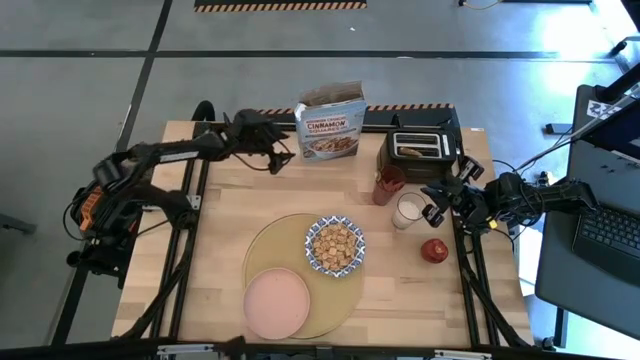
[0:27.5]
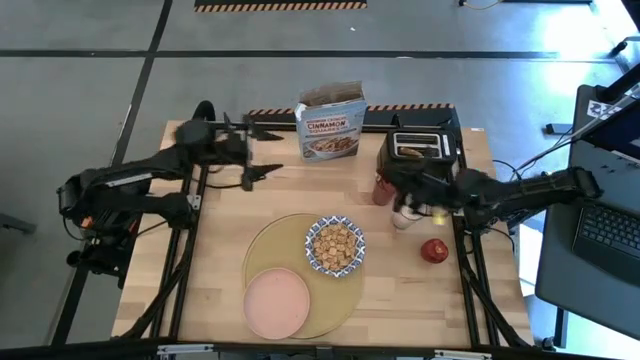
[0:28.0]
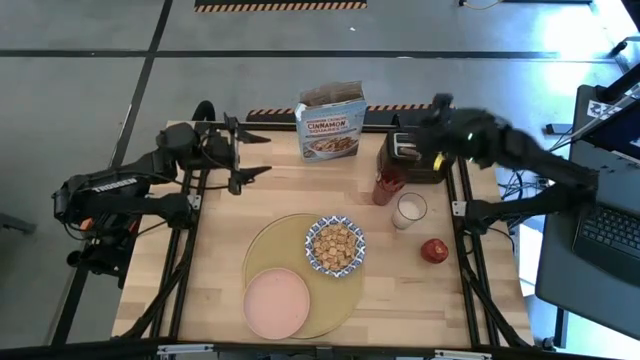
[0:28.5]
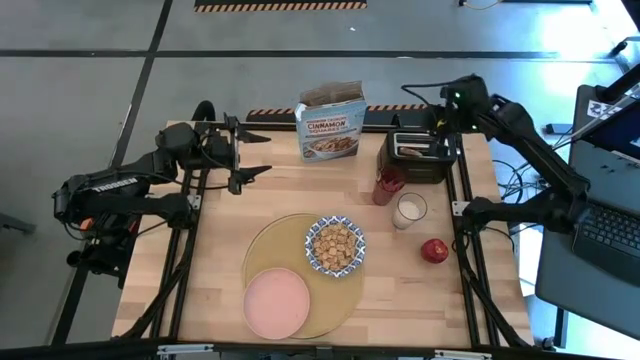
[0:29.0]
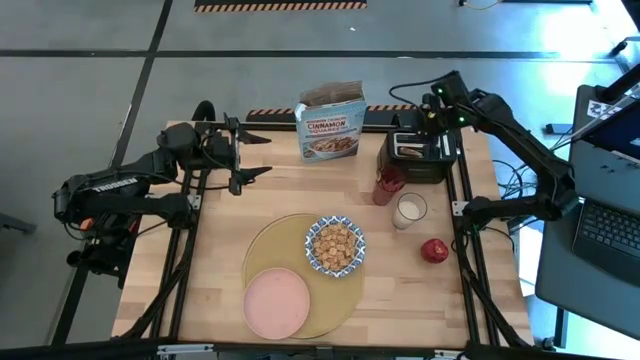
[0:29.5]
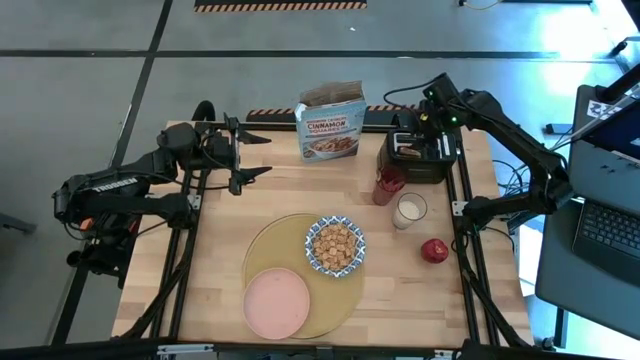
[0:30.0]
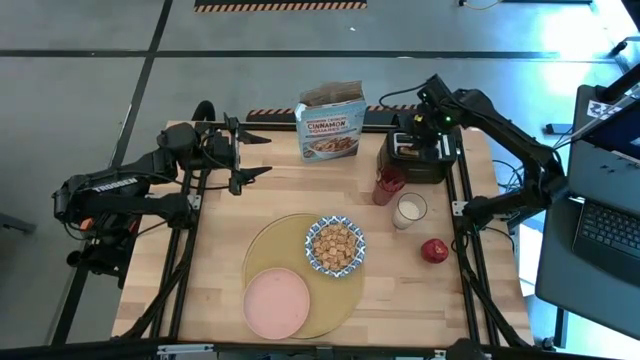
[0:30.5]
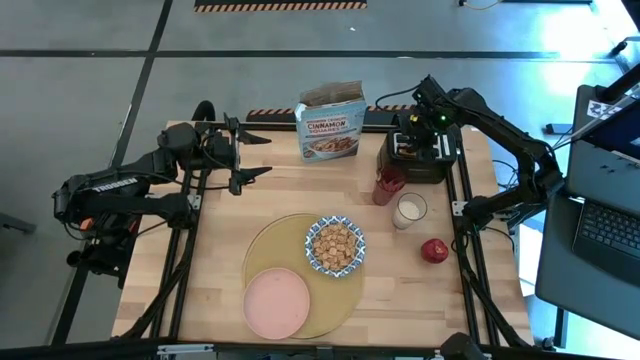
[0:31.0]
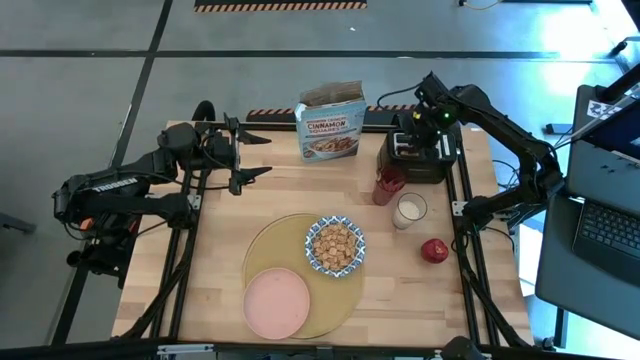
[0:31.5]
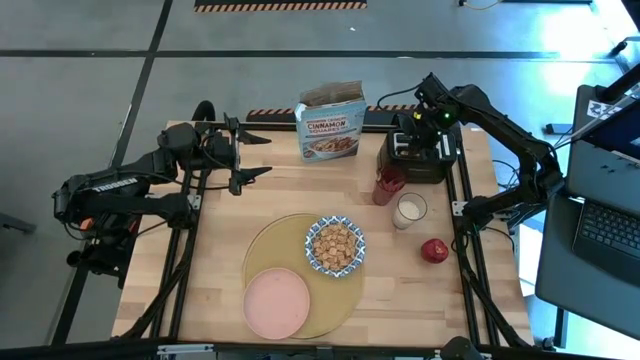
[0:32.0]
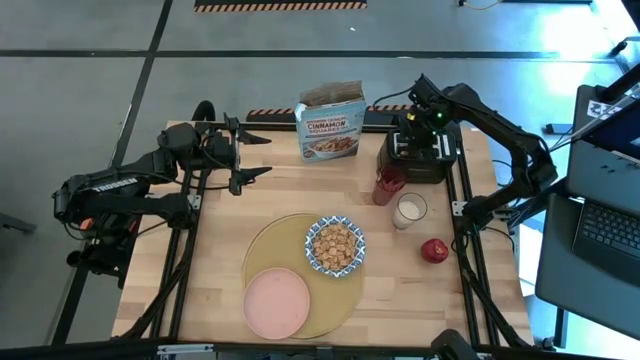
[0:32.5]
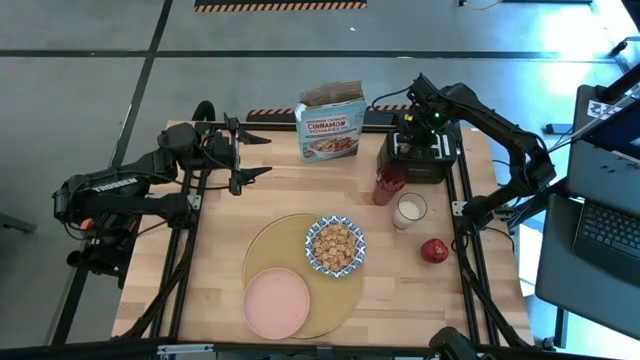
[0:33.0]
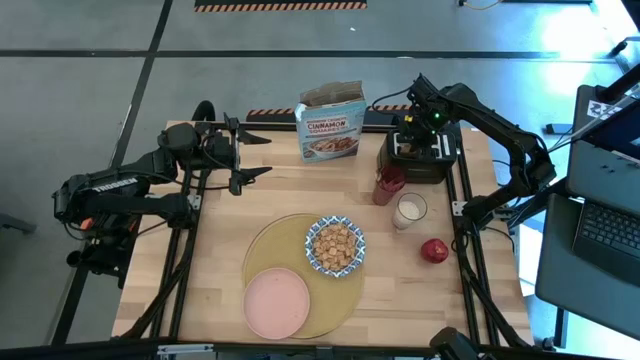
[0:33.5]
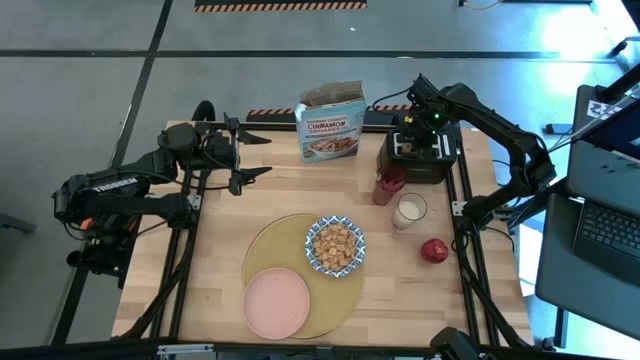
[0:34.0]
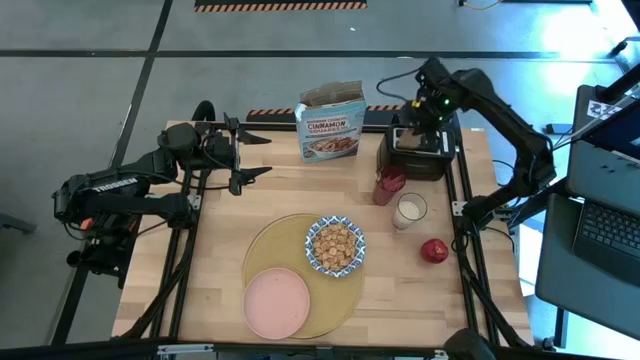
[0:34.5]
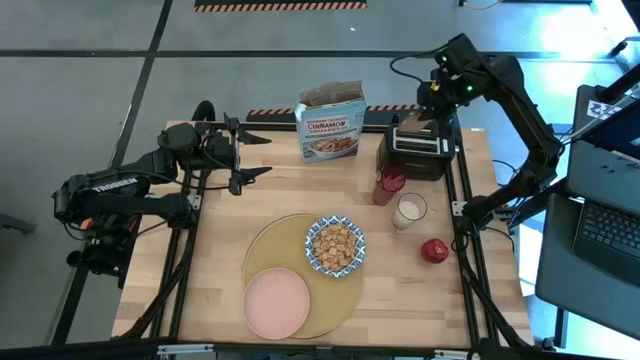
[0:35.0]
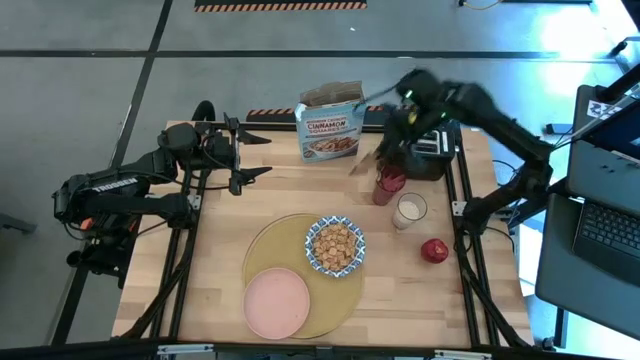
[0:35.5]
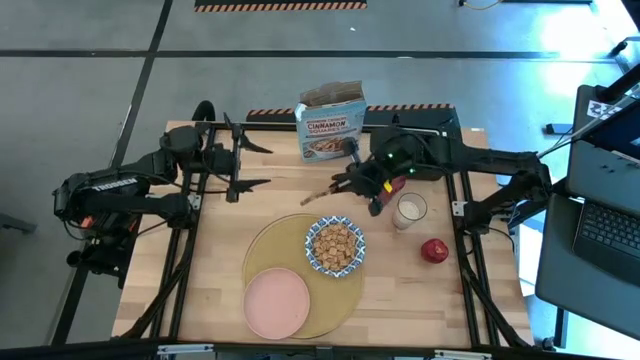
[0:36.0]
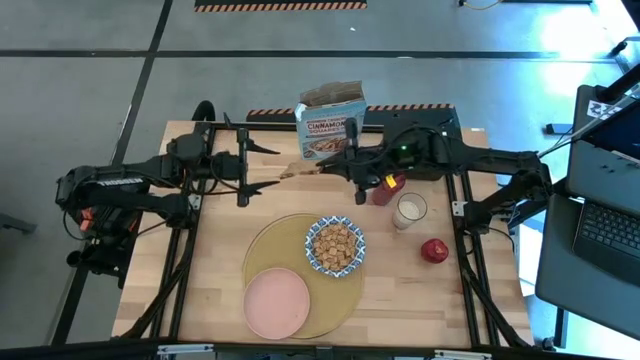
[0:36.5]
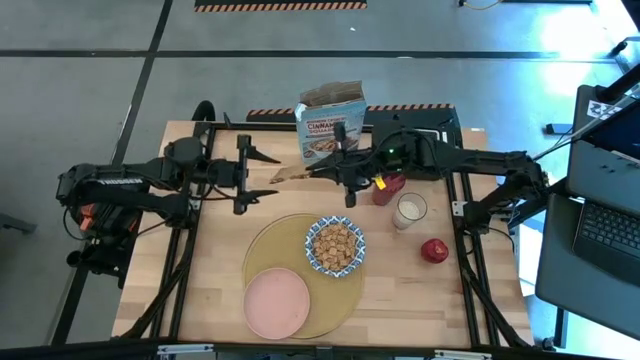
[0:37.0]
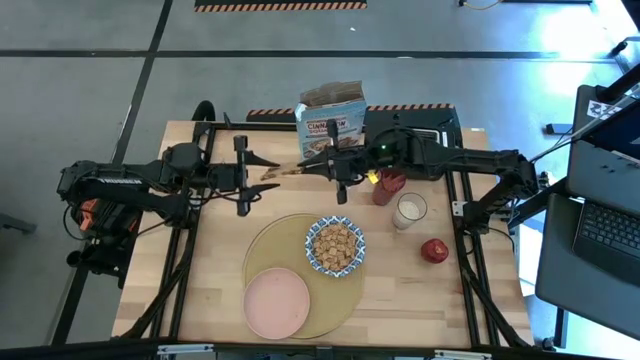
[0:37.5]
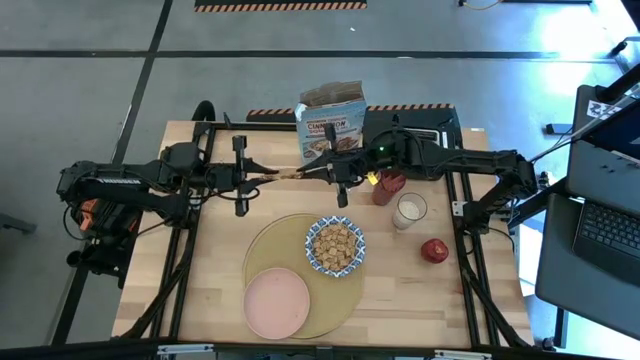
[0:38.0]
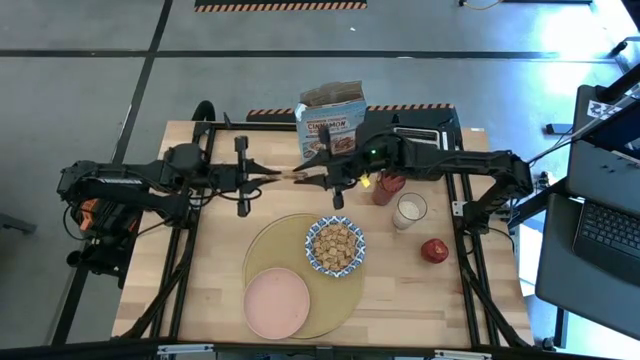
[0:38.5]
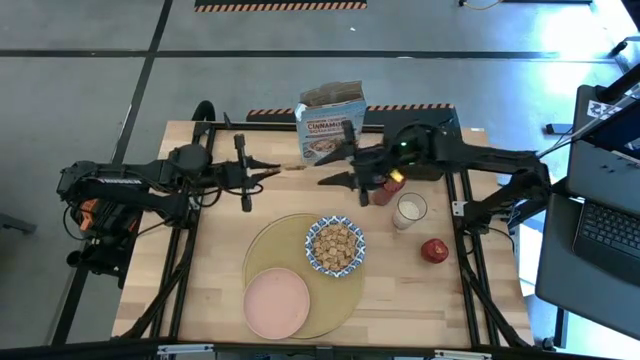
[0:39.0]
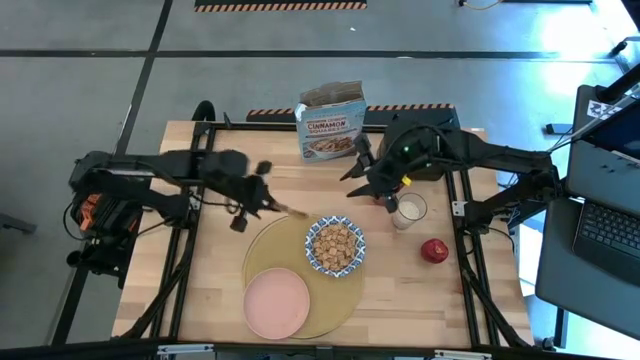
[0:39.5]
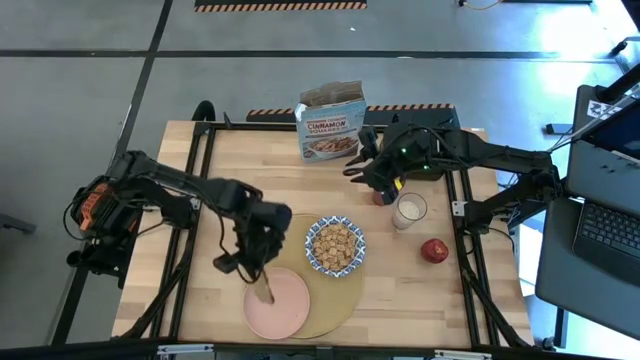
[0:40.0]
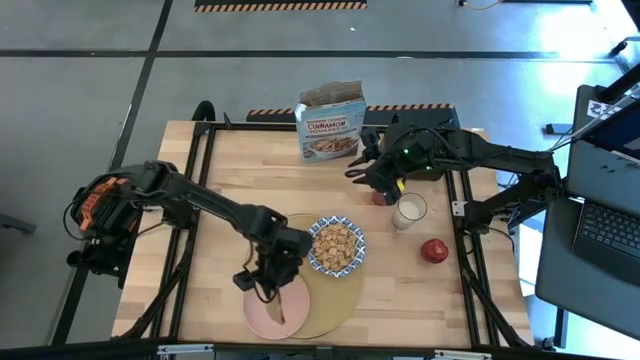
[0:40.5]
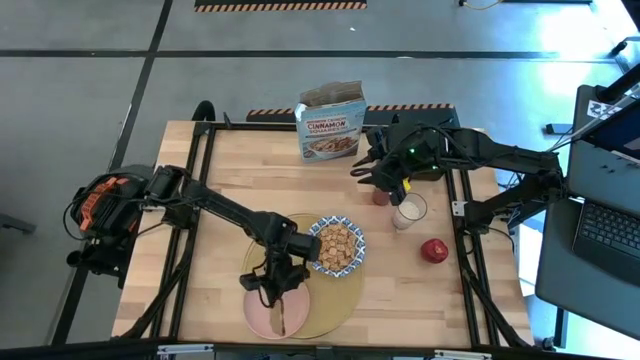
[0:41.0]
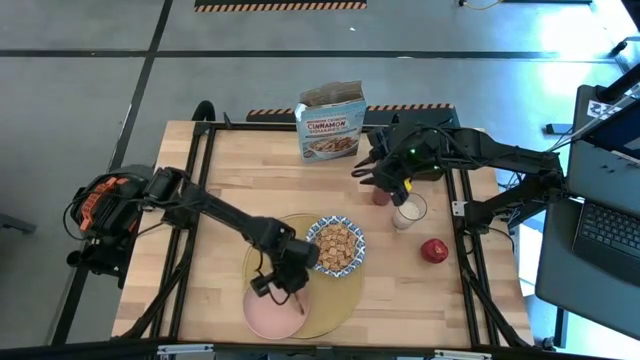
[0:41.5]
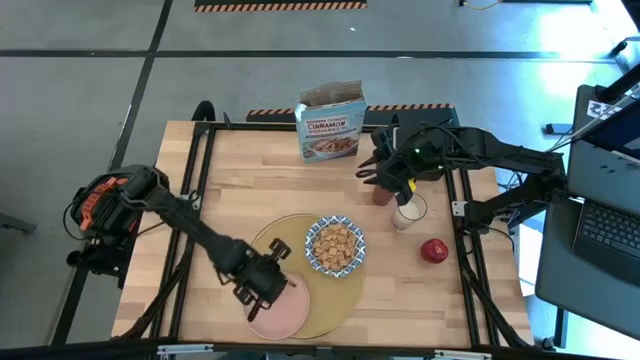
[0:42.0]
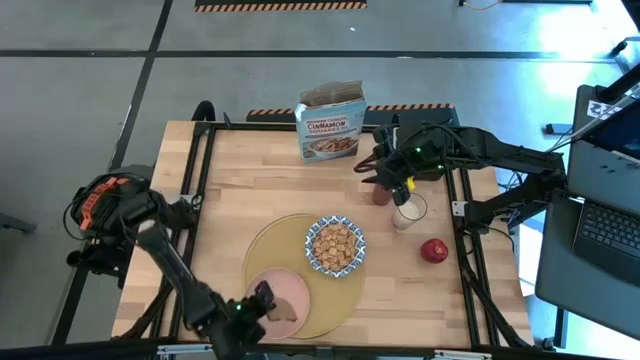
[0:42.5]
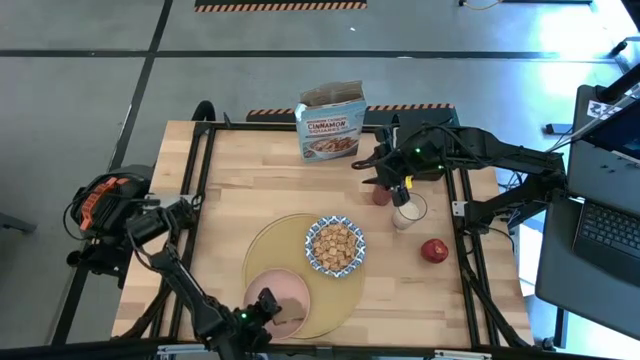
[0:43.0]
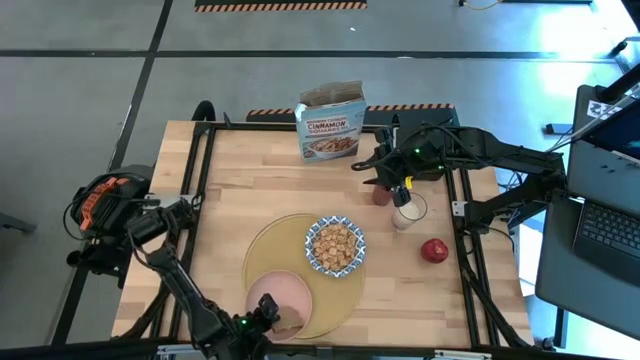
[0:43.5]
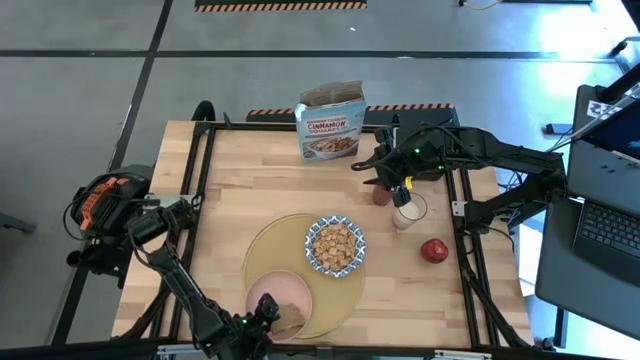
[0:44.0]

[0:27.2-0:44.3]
Task: Arrange a breakfast setting
Put the toasted bread on the pink plate

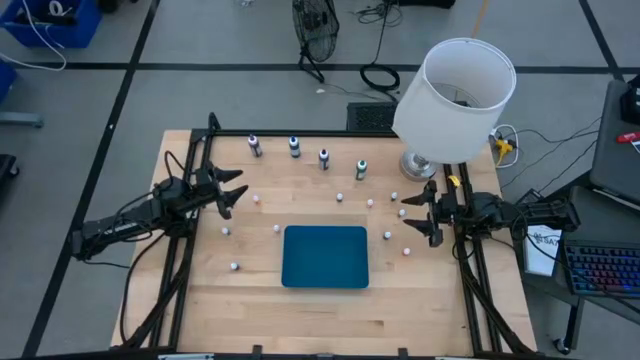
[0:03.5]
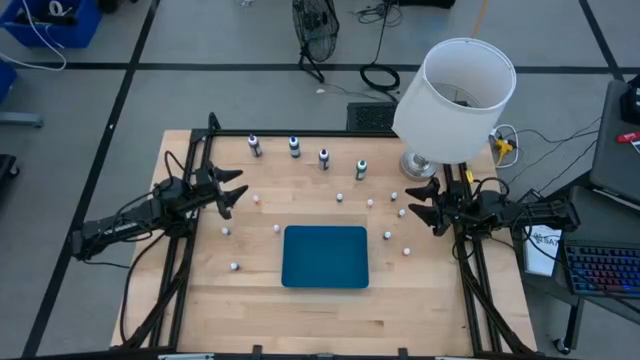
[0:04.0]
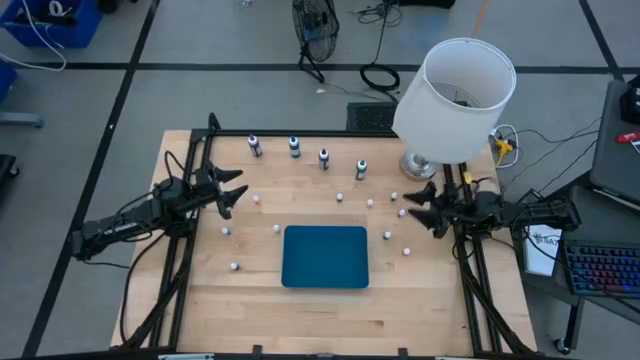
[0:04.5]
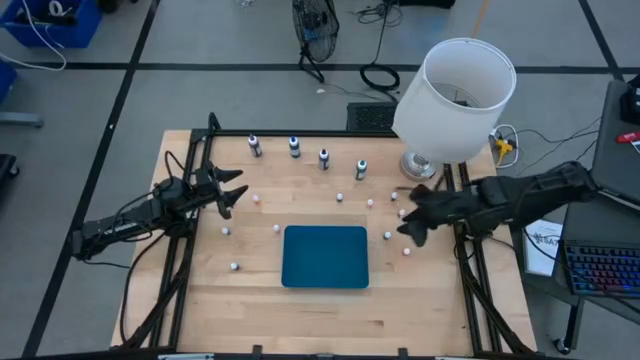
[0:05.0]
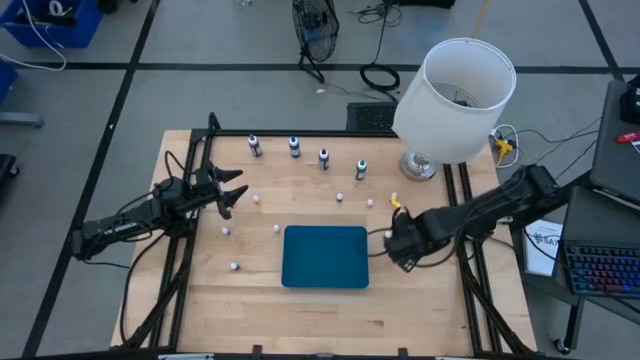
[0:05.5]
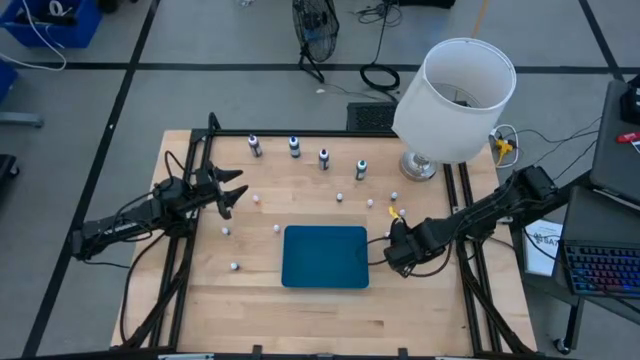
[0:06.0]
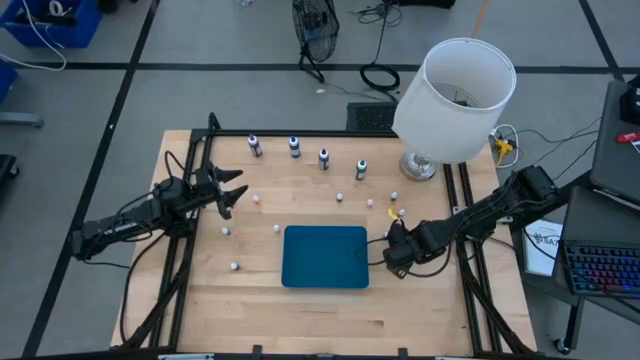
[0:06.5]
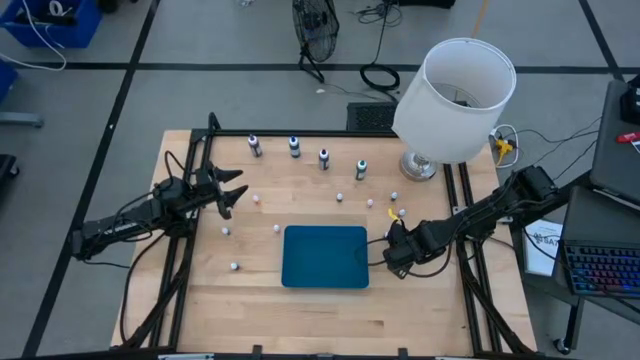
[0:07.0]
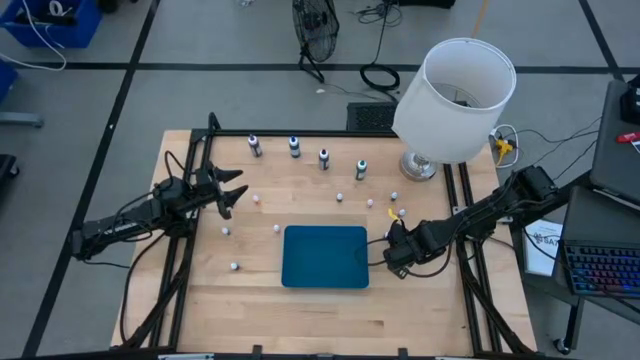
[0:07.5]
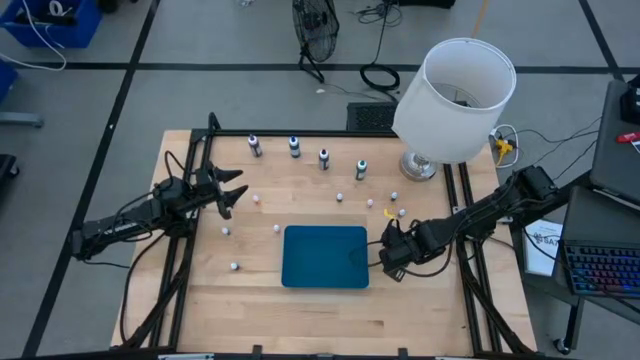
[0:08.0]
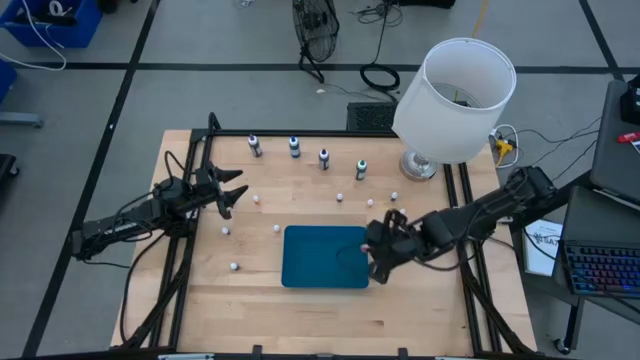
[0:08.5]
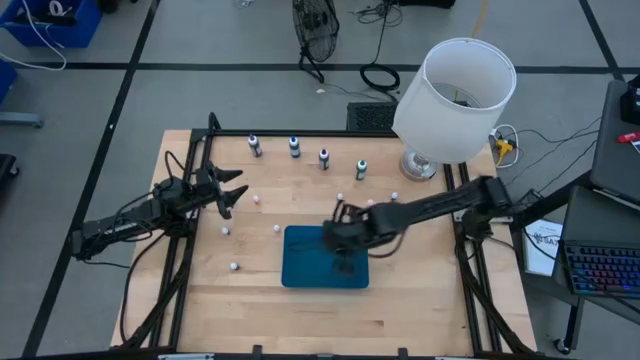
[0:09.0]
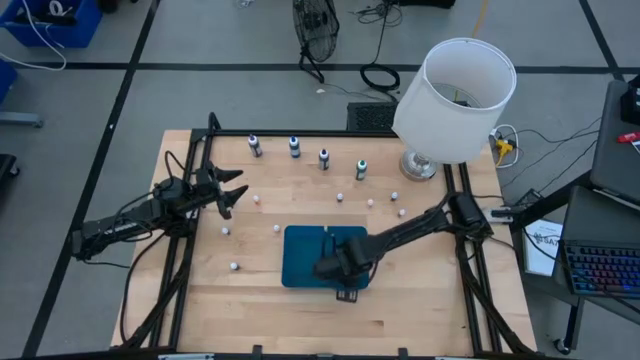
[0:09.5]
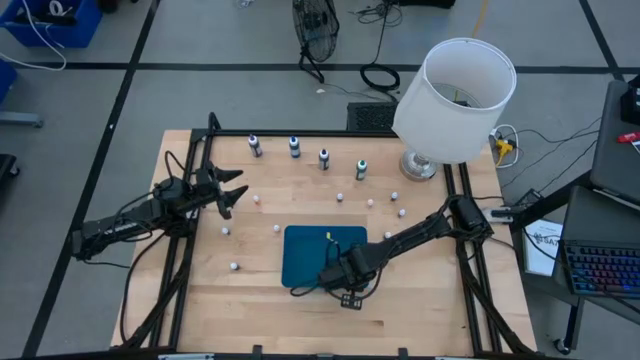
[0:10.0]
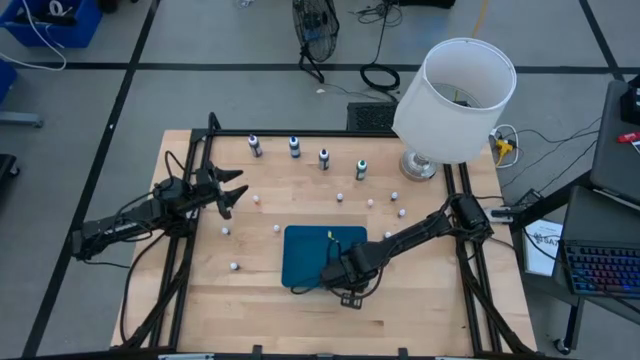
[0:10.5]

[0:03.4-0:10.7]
Task: Pick & Place food coloring
Put the bottom right small orange food coloring bottle into the blue bin
